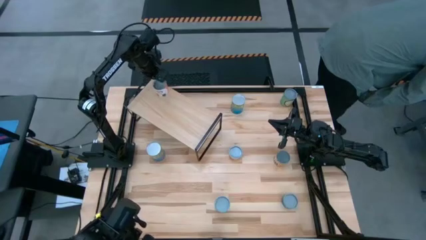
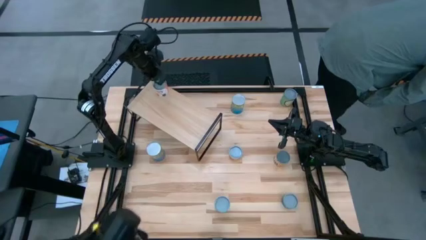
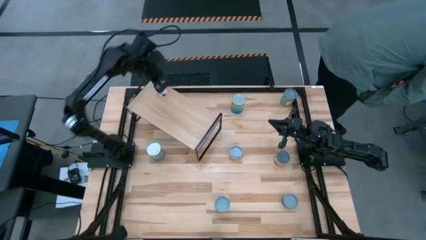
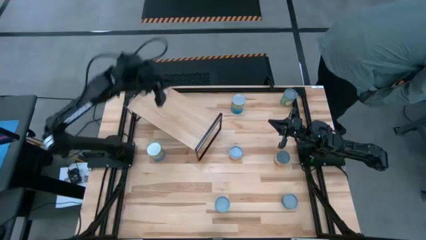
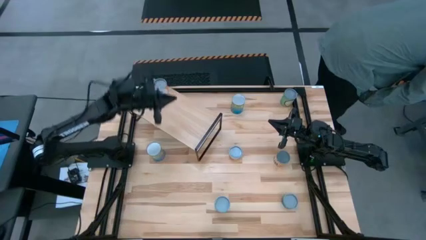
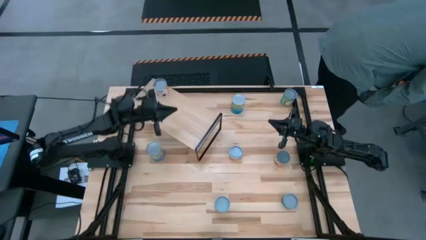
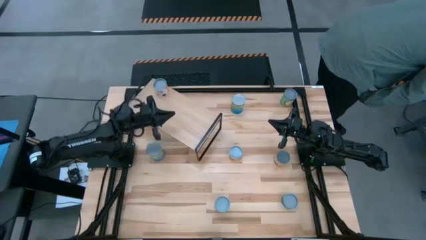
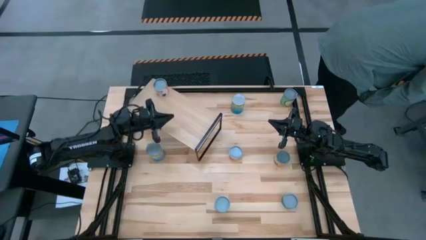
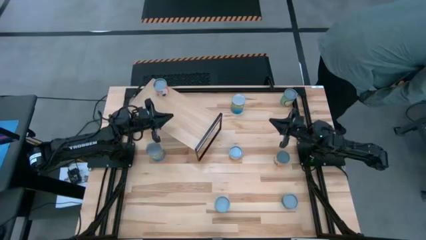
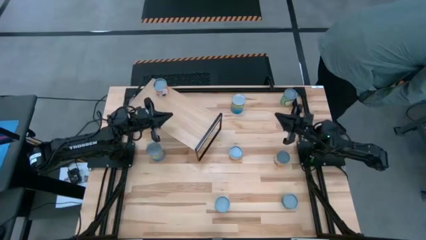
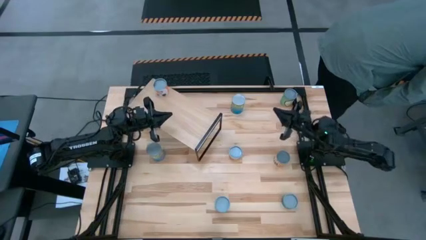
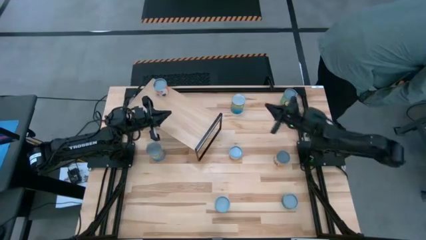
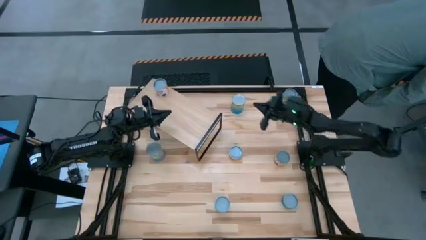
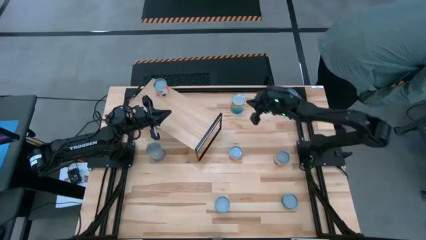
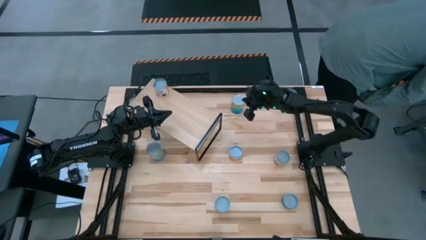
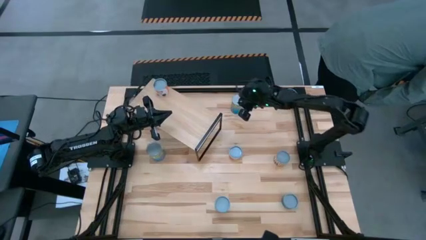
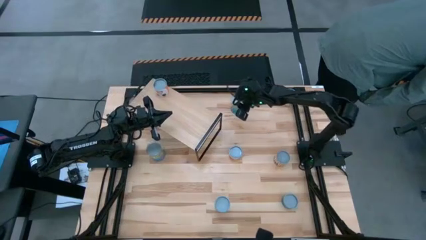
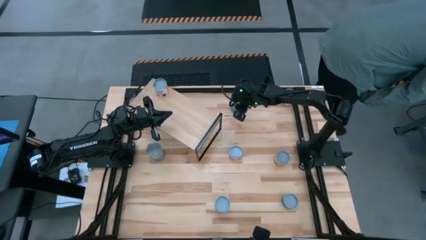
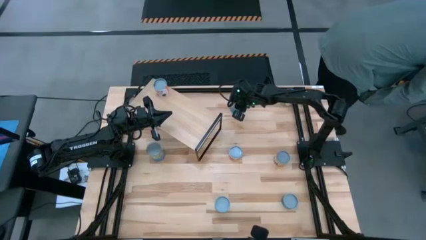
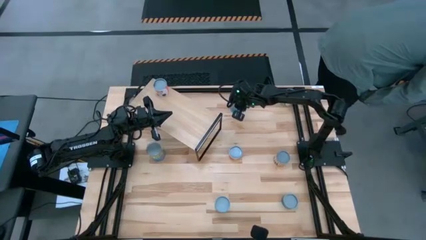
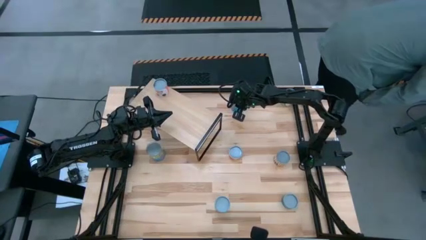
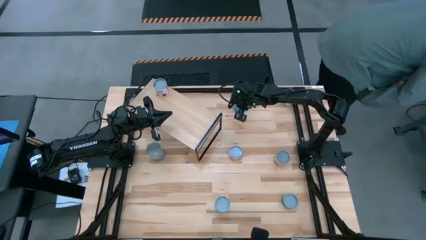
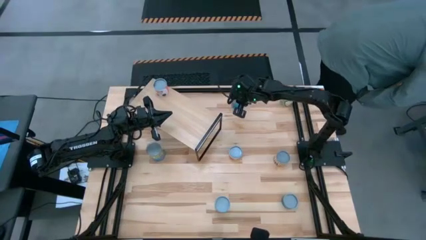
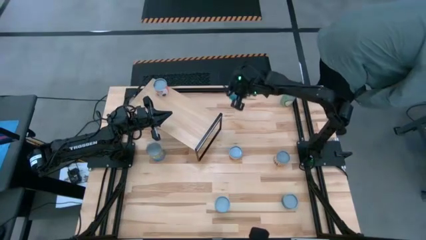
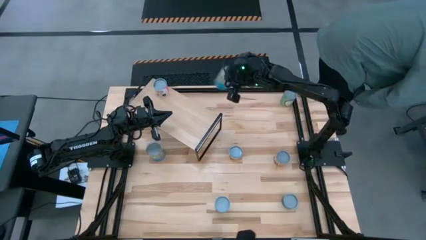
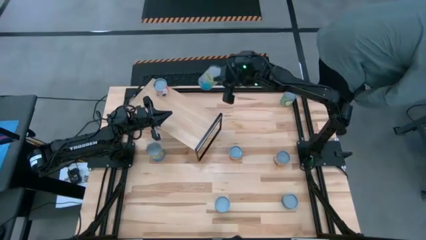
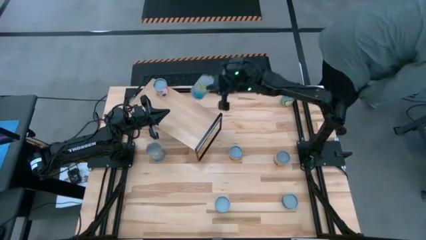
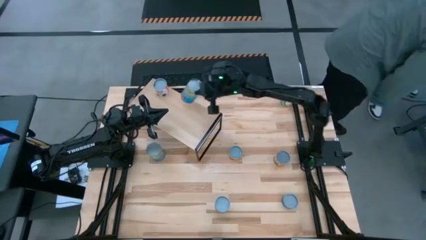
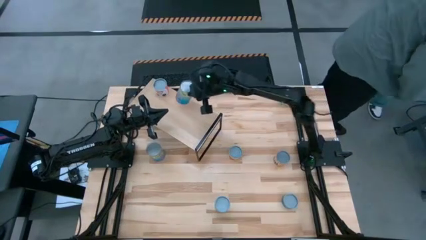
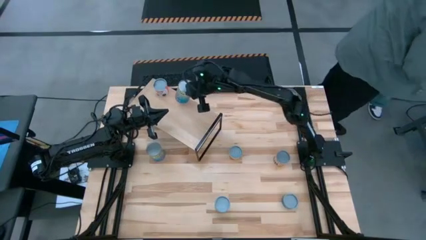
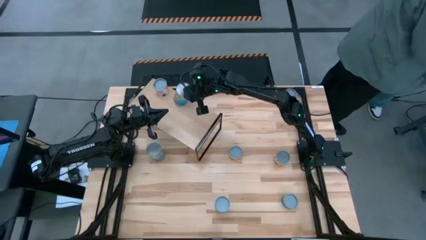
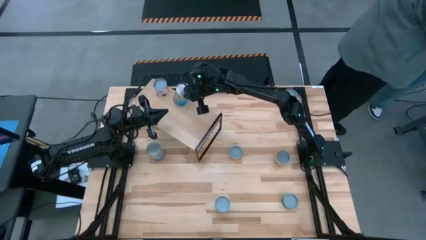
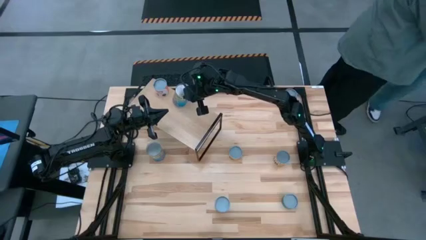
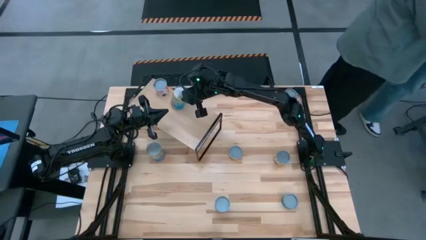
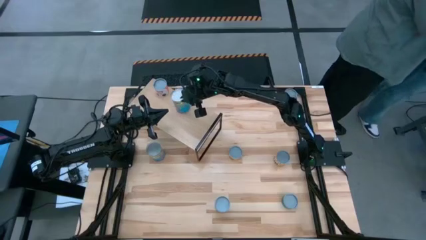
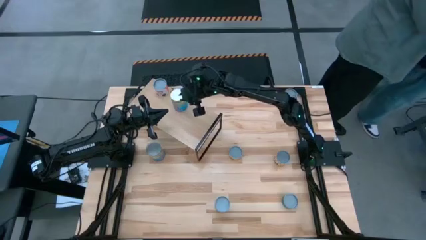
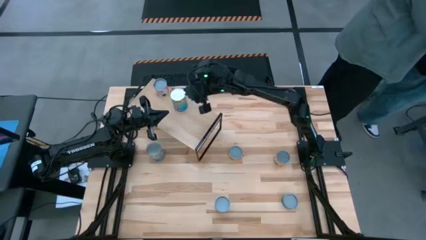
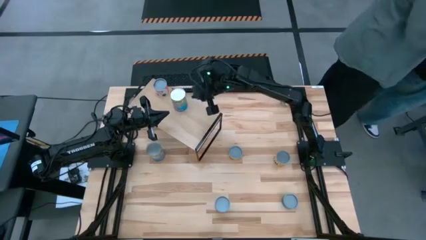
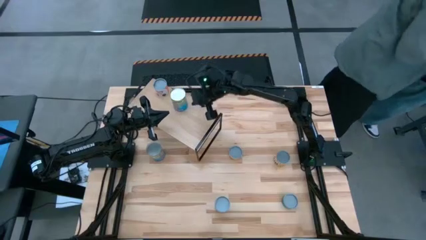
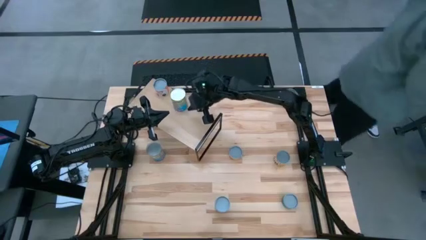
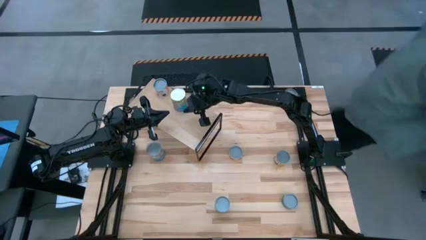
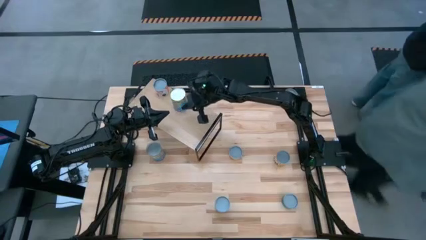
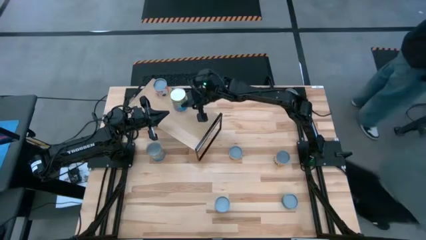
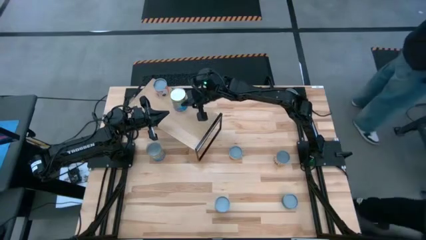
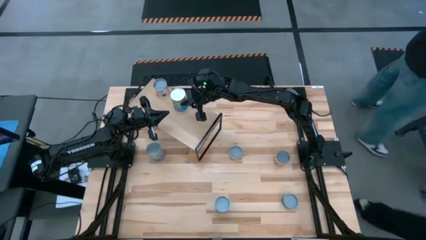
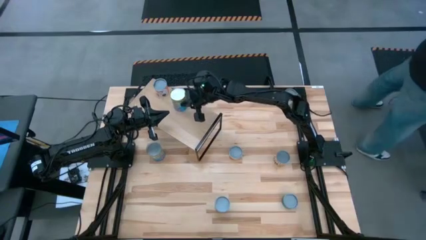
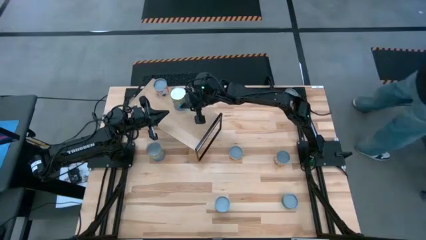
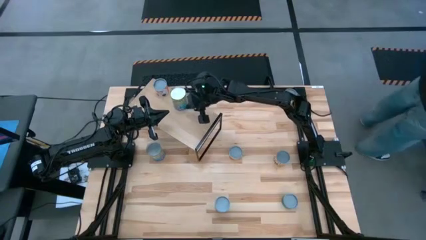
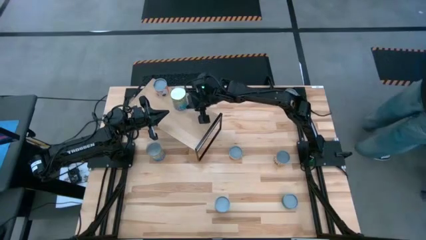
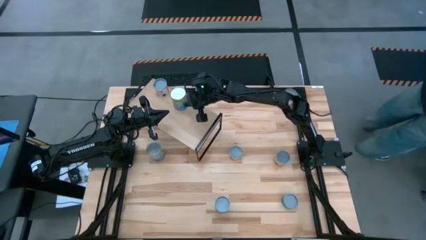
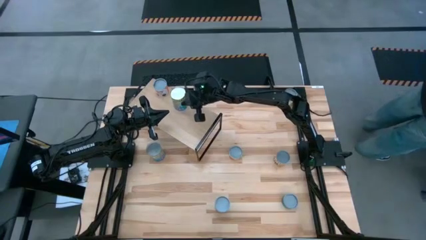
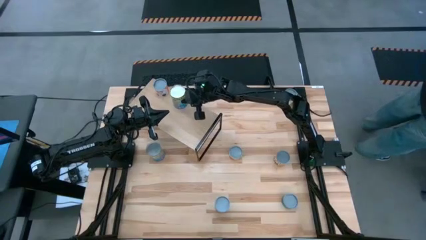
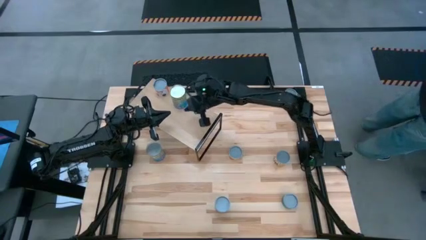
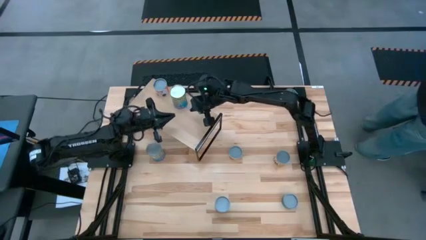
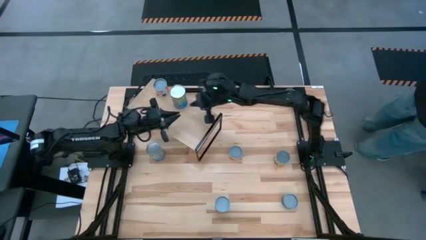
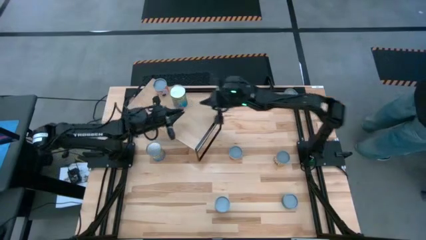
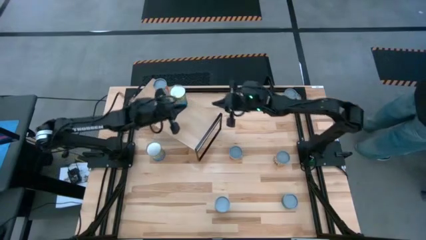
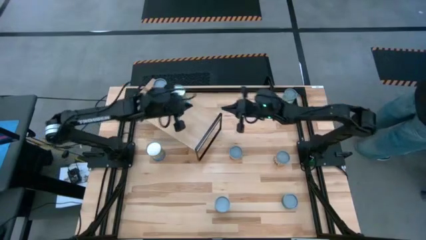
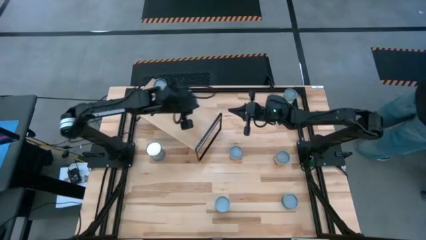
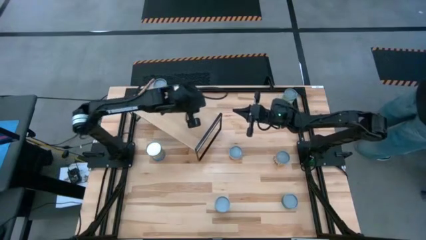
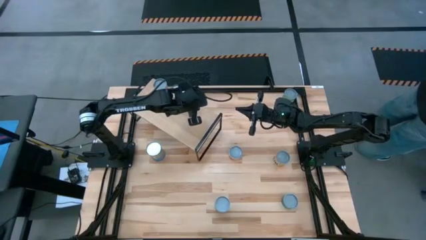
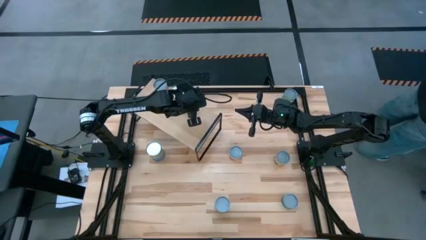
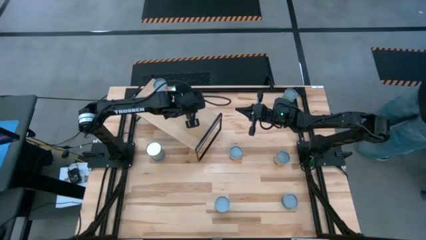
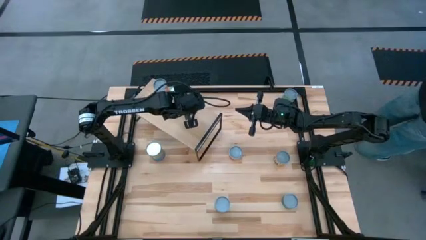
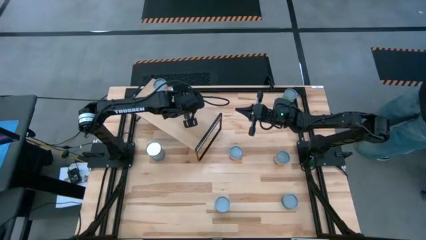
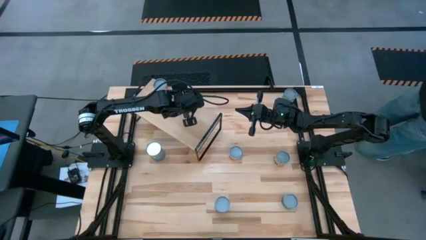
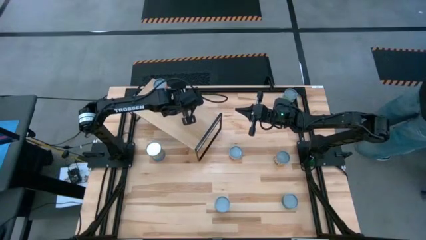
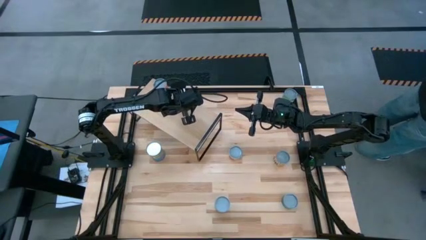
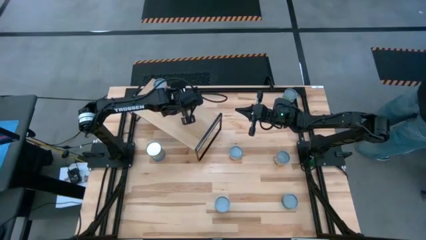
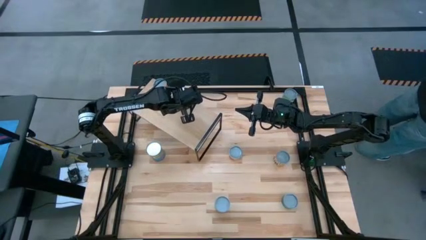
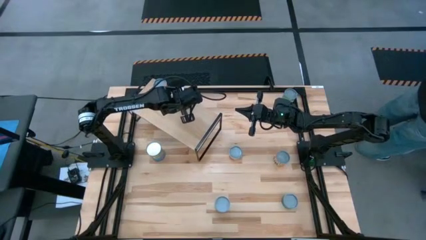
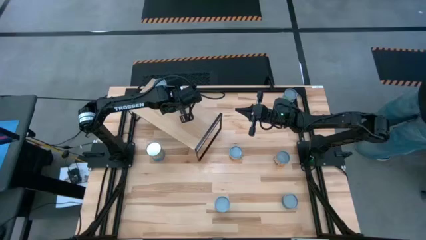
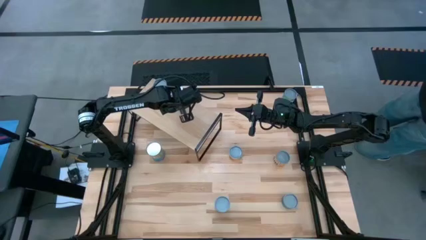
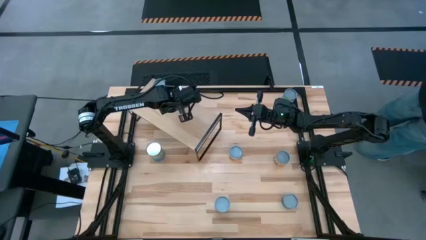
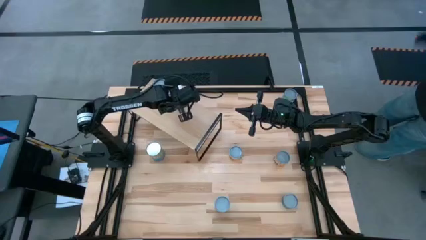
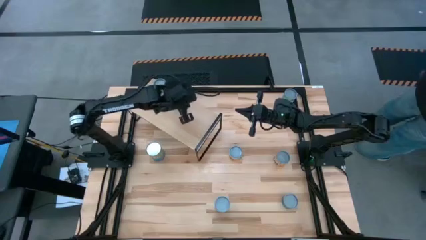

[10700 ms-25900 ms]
Task: Pick and place cans onto a shelf
Put the canned cherries on the shelf
